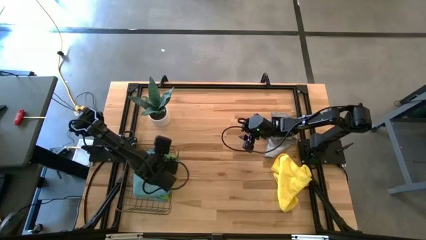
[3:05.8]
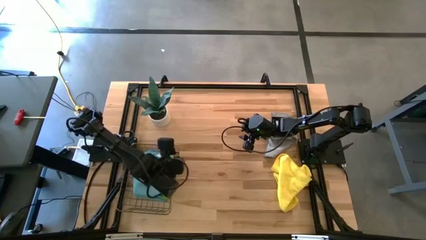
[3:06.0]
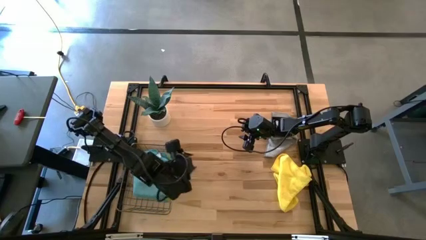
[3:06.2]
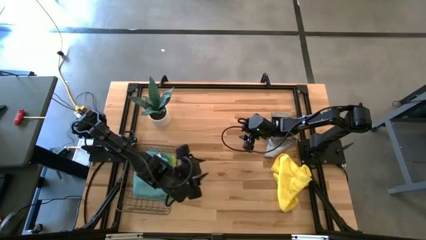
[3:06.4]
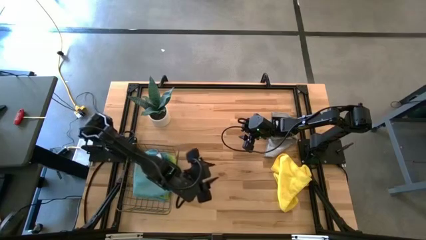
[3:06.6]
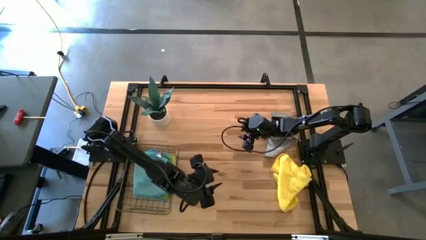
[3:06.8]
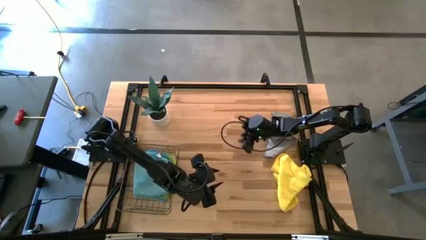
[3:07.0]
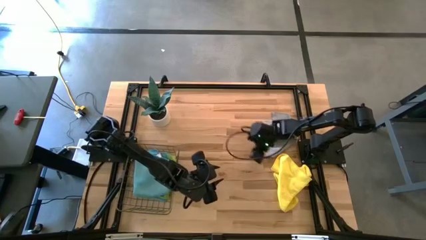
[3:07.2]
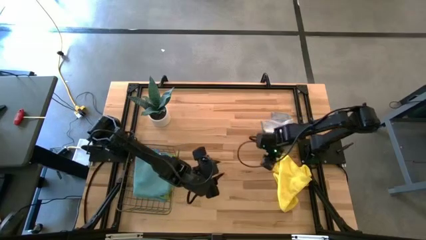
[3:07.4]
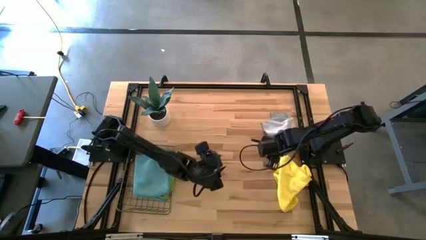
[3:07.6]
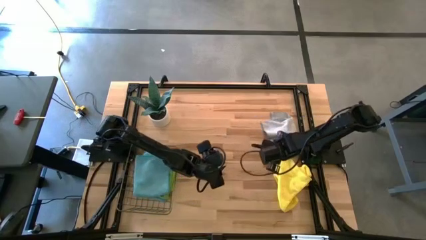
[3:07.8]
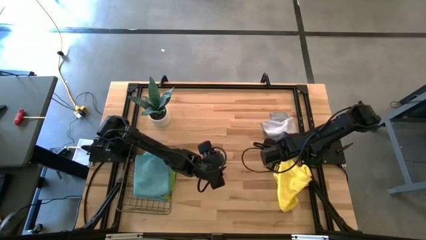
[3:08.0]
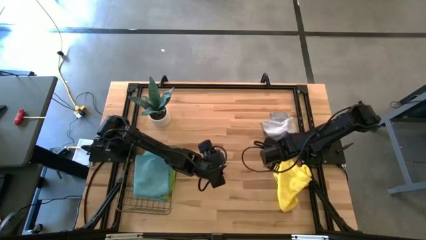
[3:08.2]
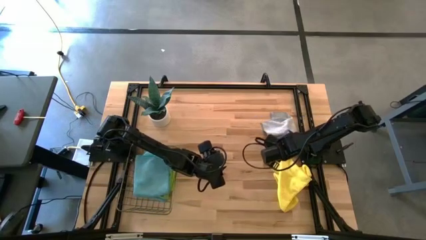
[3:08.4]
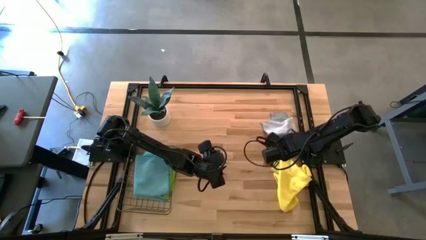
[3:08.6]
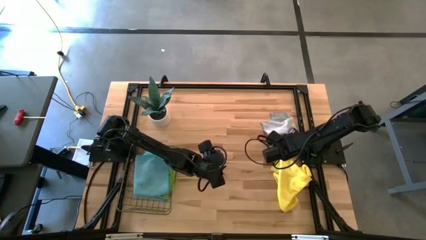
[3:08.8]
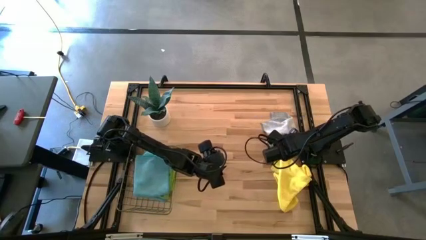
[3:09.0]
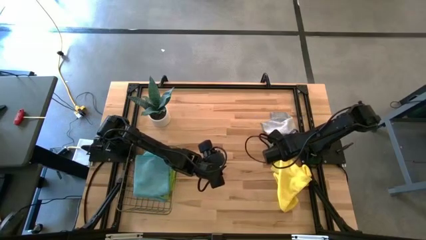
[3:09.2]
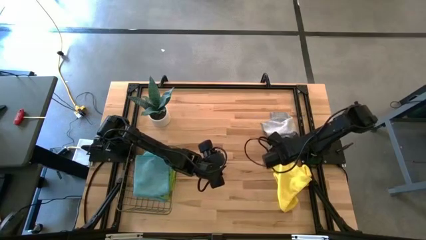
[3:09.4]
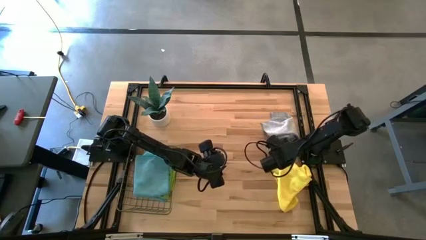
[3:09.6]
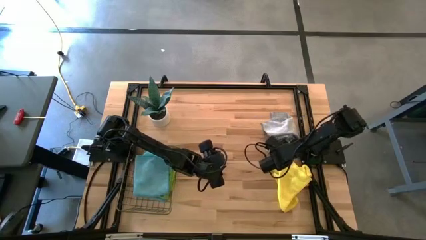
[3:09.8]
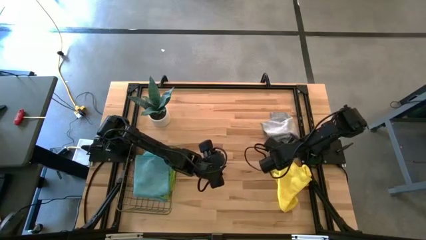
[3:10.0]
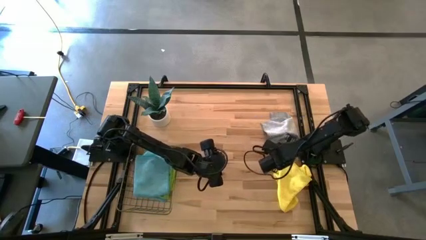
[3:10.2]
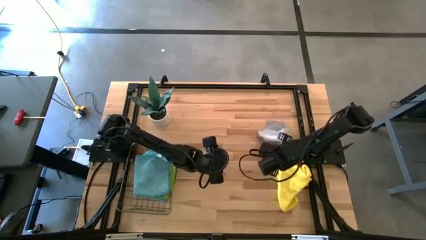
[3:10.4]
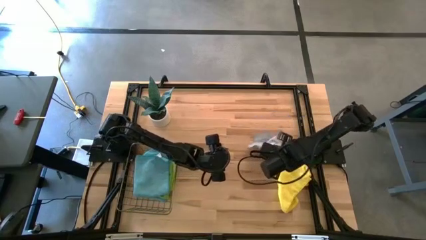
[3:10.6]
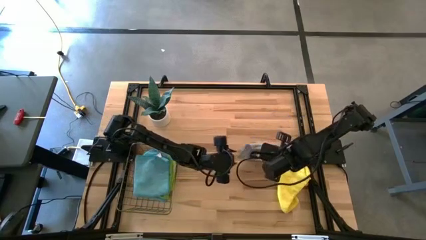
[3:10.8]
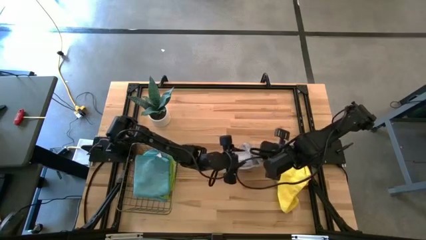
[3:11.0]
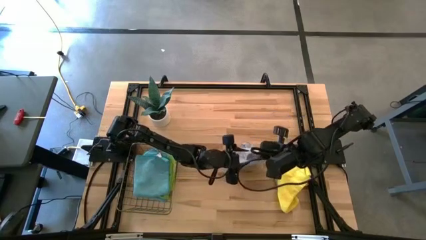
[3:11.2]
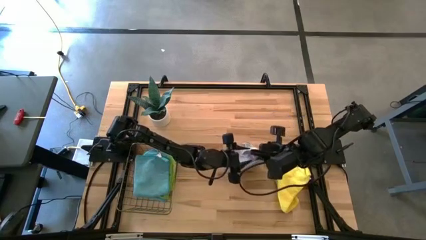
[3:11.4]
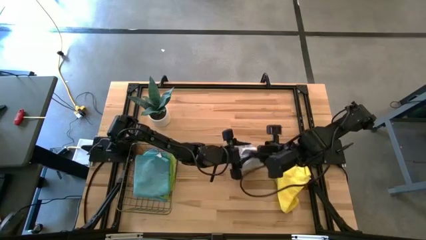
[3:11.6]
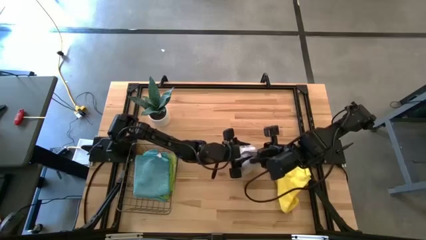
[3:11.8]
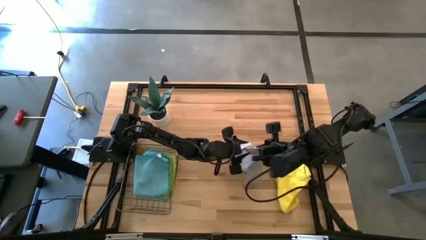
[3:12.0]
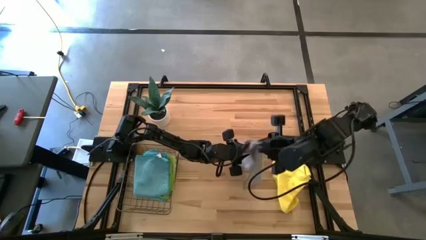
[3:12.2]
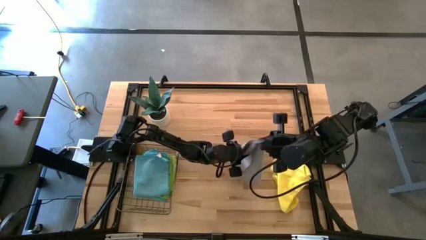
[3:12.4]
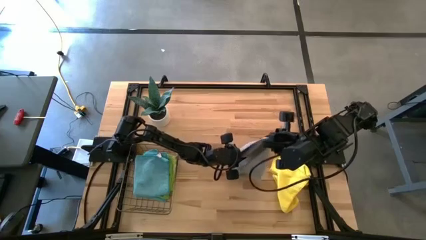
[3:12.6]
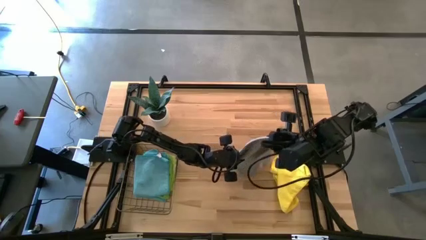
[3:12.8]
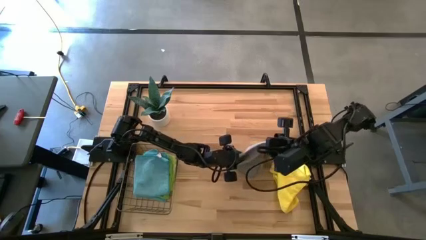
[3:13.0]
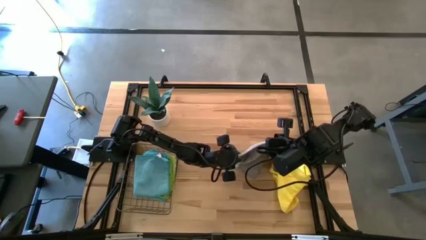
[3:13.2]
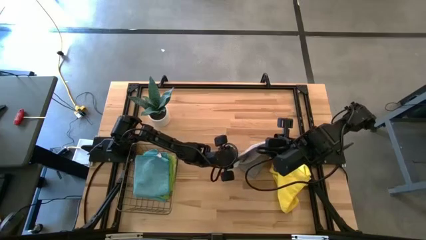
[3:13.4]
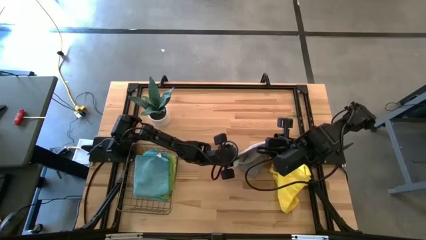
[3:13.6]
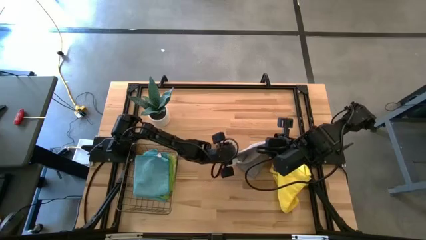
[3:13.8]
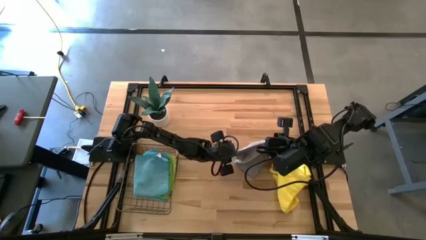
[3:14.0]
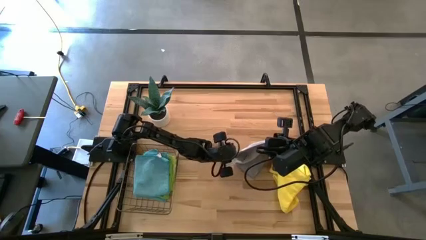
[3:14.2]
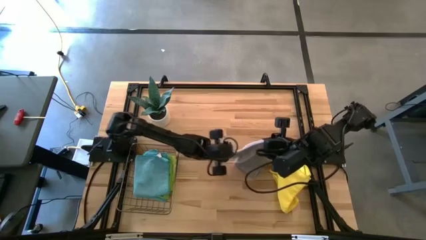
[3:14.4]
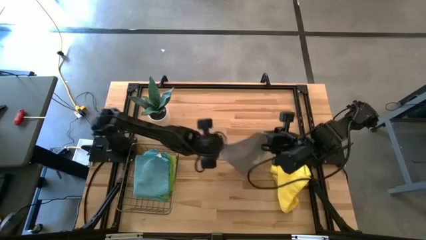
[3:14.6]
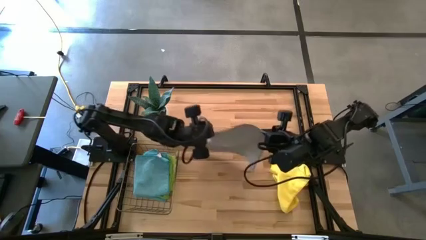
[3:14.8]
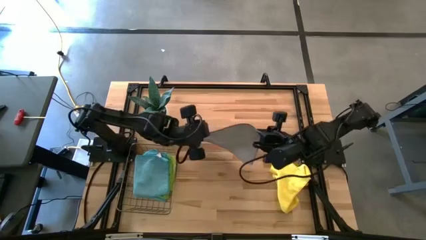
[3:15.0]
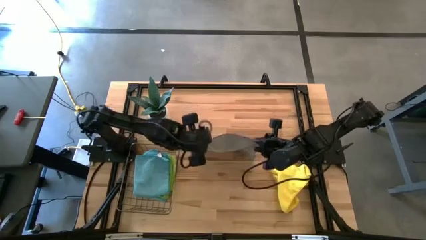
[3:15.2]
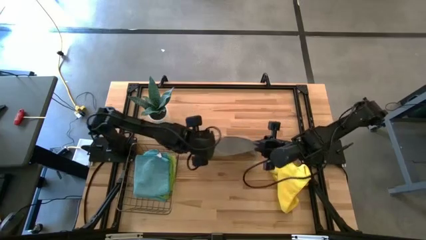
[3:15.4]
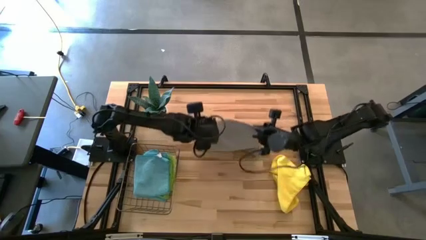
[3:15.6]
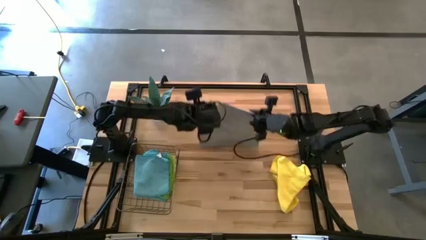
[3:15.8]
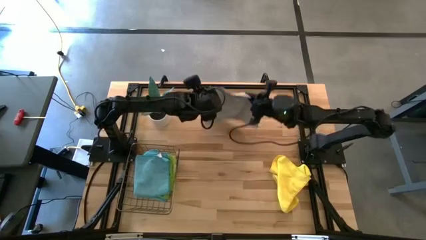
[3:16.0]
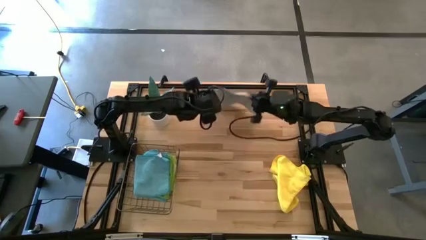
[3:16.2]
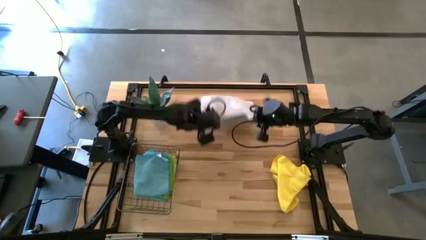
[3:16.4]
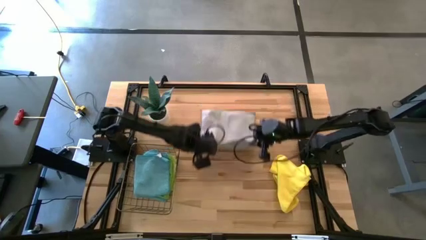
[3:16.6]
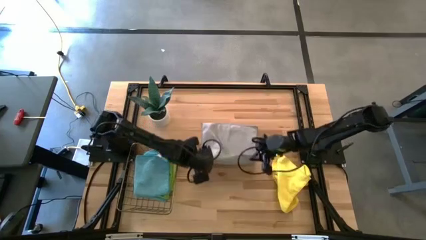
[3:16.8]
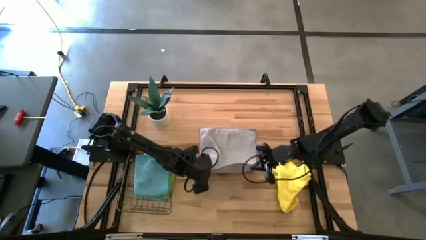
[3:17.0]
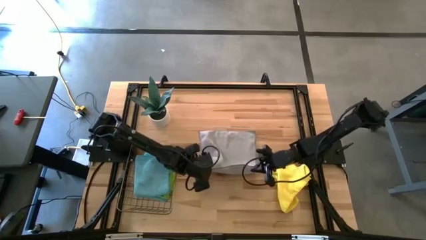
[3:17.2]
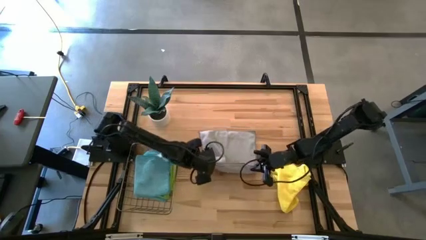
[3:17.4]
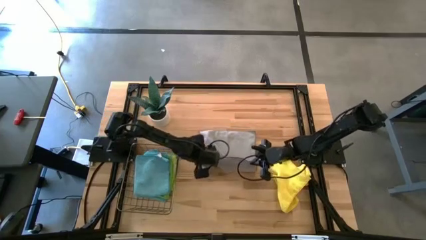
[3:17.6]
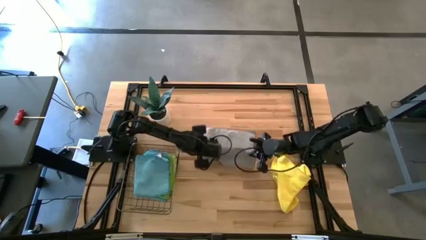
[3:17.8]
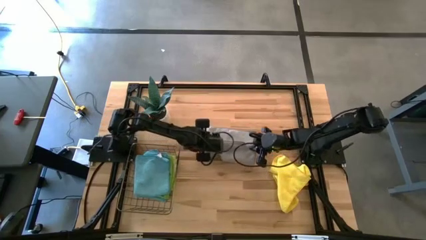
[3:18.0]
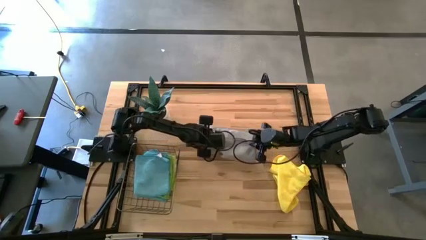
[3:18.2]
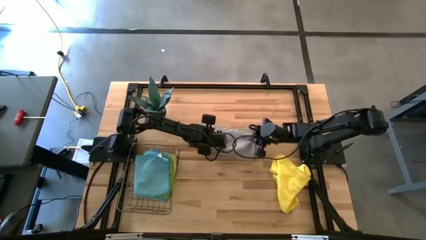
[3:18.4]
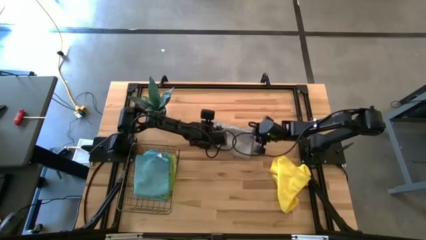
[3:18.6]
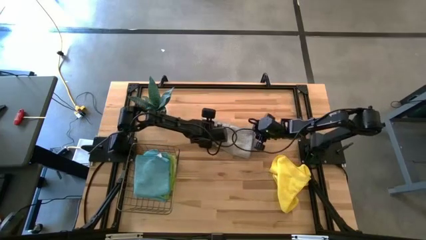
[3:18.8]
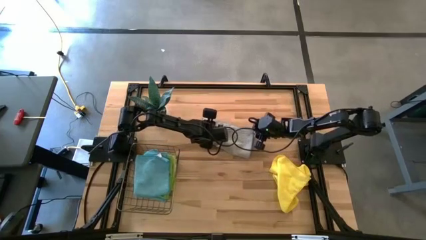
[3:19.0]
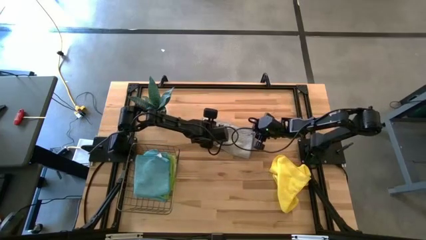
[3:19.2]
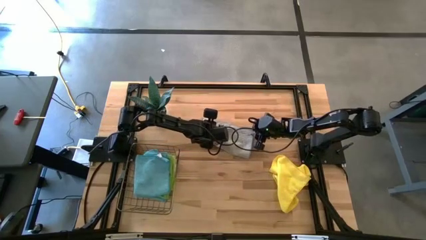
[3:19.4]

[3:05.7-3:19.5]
Task: Fold microfiber towels
Fold the gray microfiber towel
